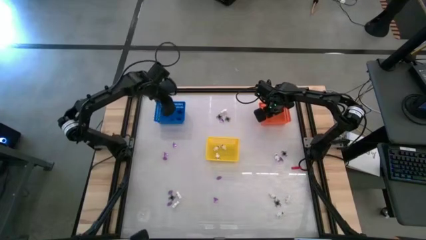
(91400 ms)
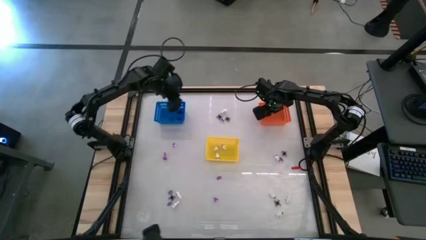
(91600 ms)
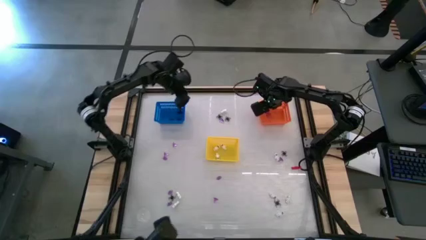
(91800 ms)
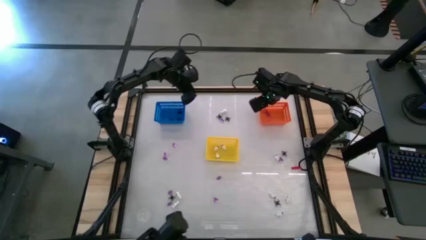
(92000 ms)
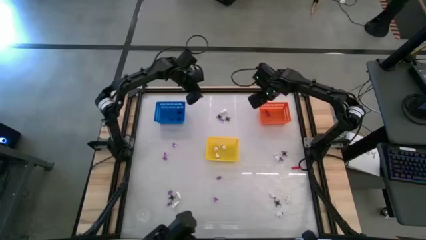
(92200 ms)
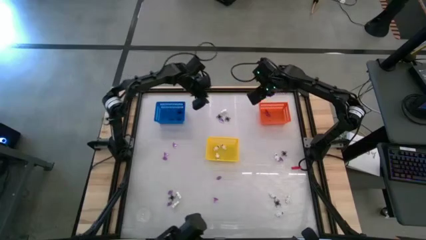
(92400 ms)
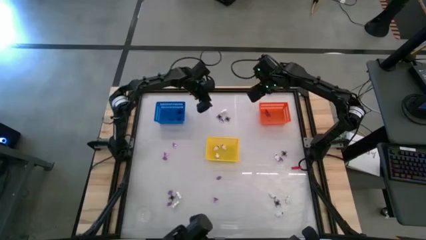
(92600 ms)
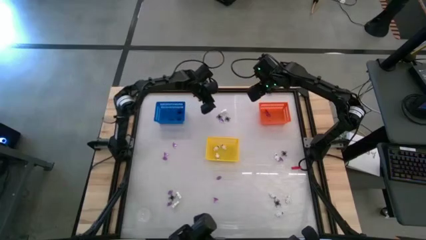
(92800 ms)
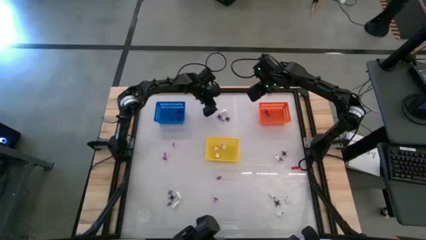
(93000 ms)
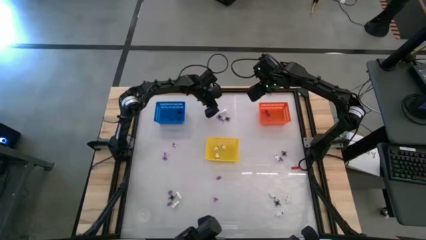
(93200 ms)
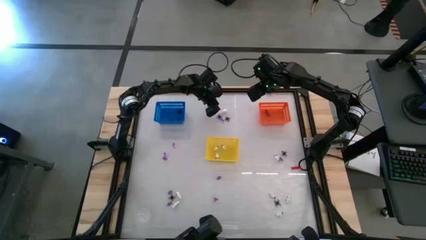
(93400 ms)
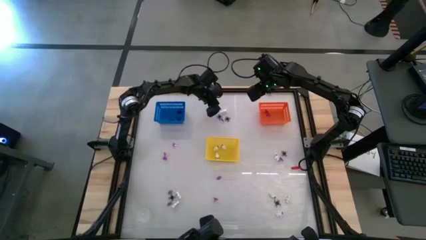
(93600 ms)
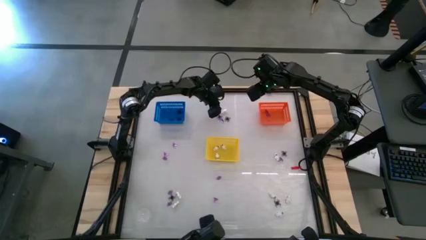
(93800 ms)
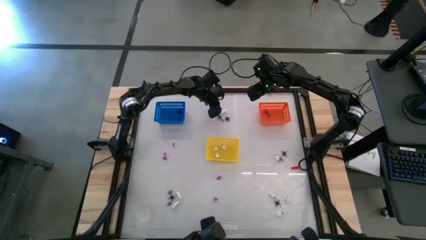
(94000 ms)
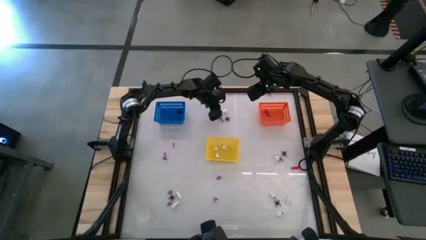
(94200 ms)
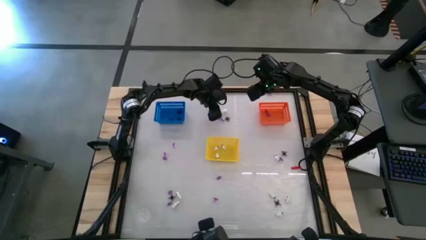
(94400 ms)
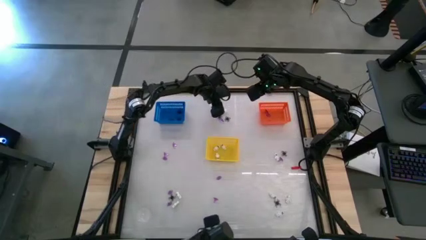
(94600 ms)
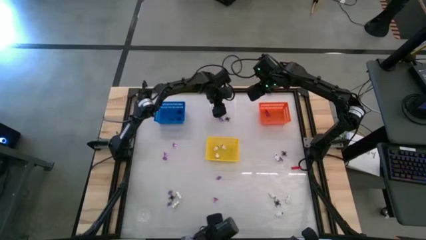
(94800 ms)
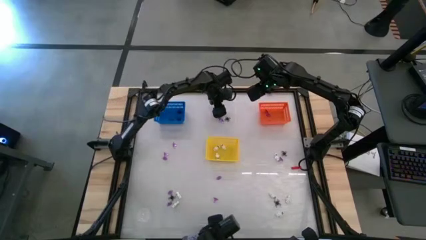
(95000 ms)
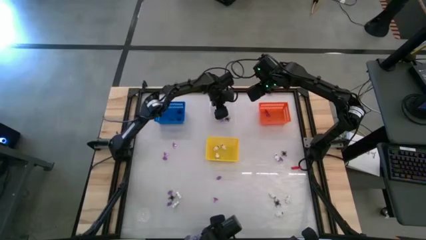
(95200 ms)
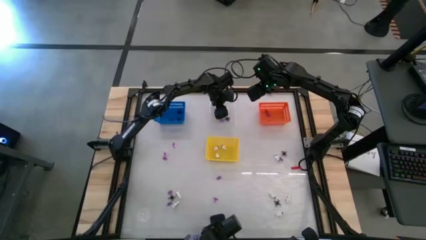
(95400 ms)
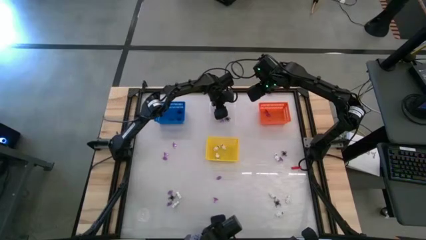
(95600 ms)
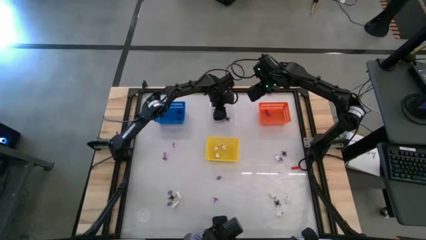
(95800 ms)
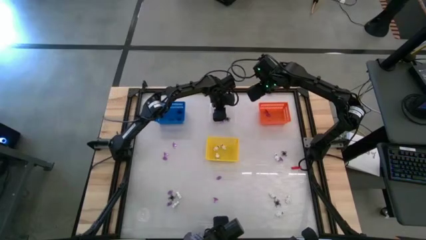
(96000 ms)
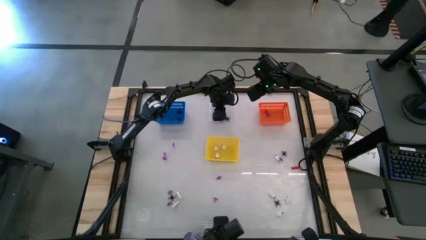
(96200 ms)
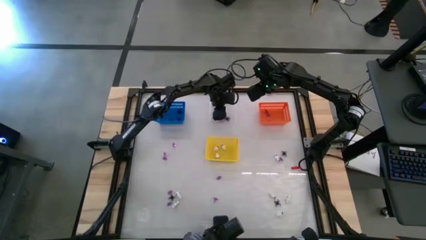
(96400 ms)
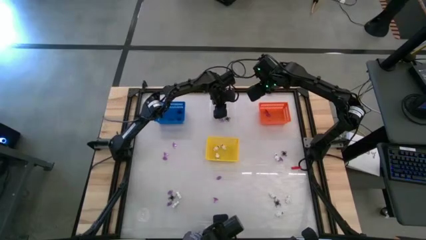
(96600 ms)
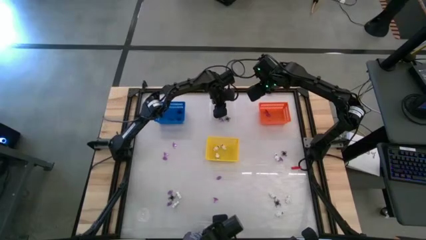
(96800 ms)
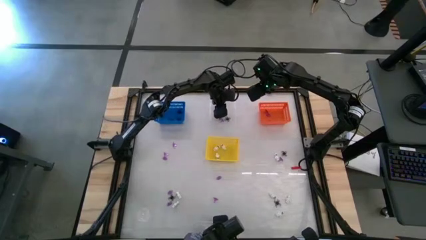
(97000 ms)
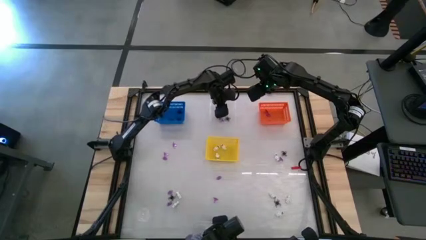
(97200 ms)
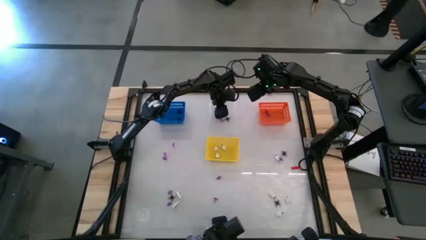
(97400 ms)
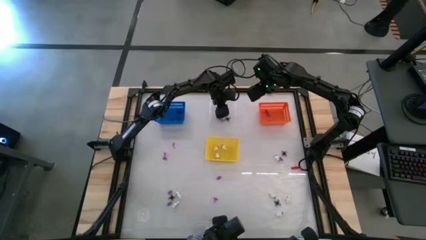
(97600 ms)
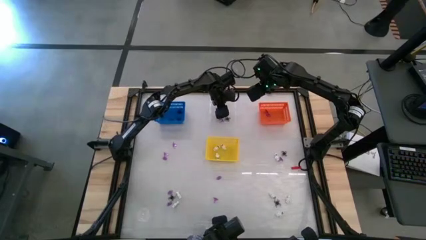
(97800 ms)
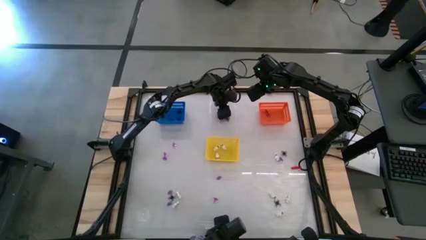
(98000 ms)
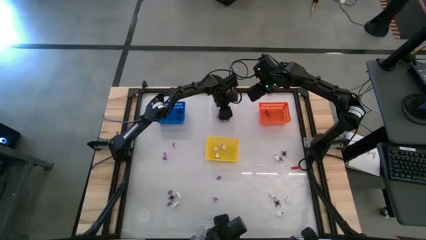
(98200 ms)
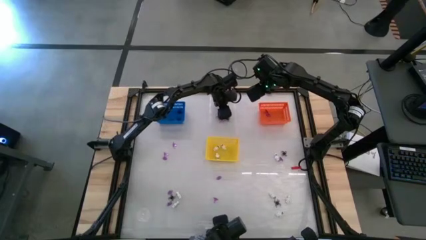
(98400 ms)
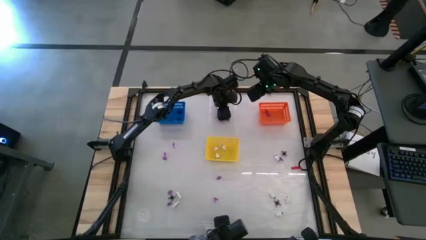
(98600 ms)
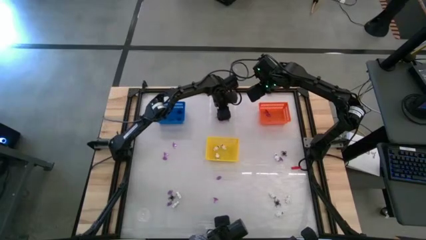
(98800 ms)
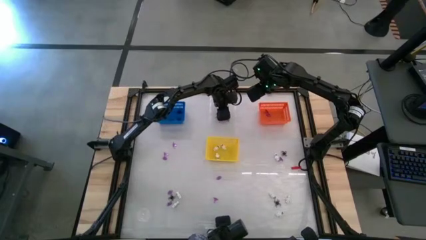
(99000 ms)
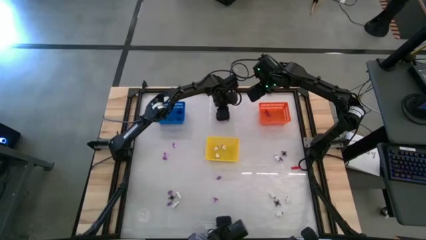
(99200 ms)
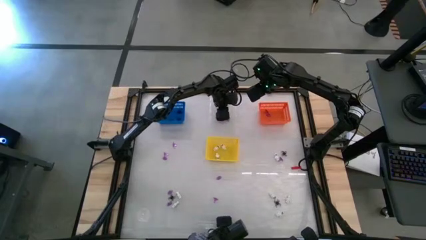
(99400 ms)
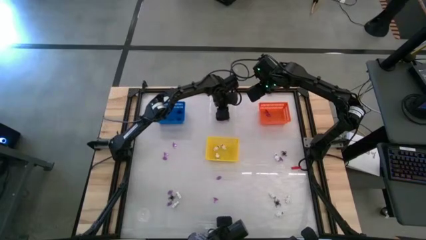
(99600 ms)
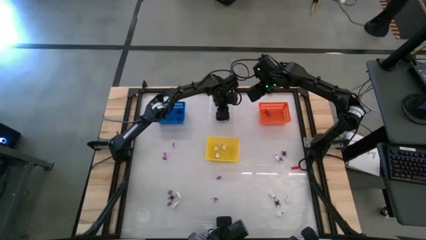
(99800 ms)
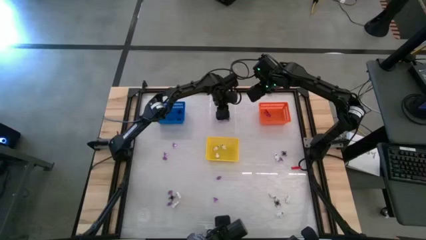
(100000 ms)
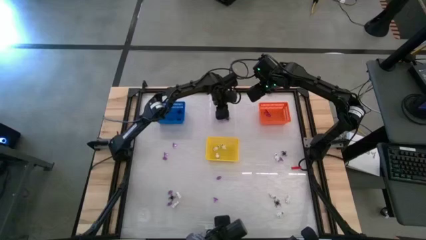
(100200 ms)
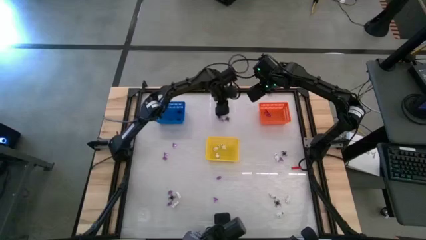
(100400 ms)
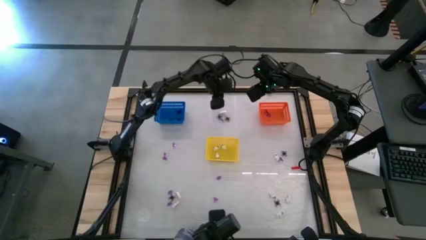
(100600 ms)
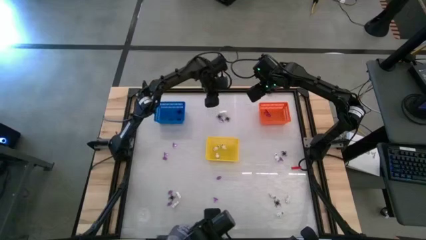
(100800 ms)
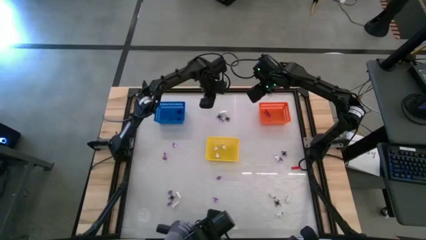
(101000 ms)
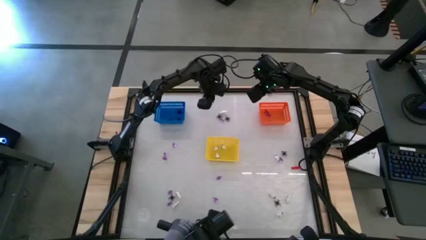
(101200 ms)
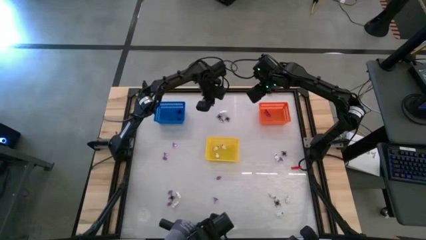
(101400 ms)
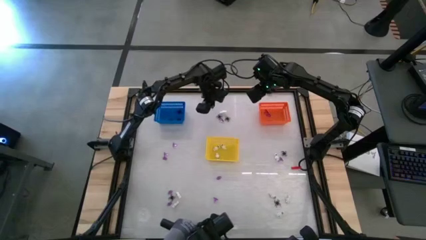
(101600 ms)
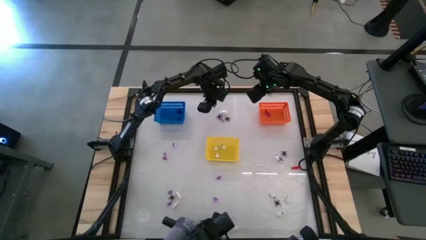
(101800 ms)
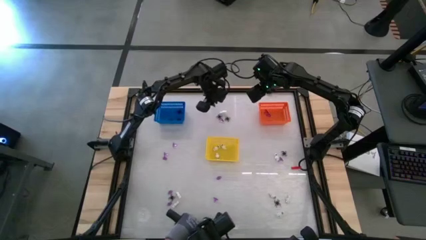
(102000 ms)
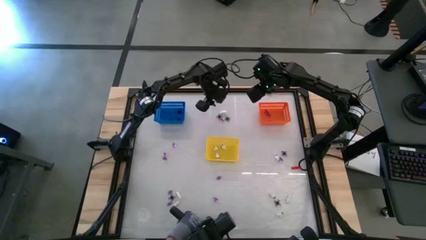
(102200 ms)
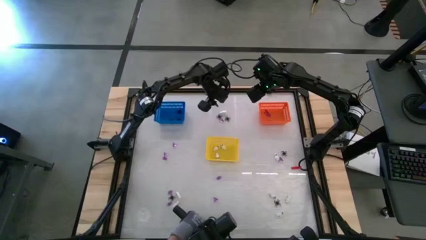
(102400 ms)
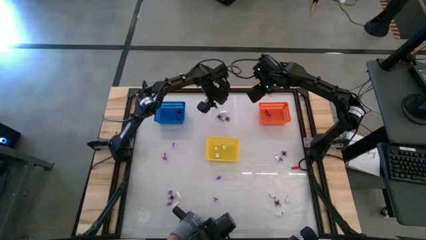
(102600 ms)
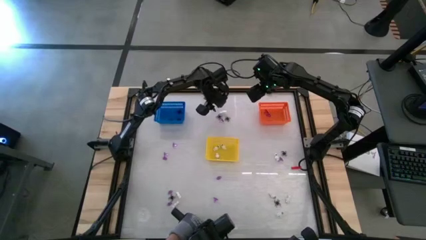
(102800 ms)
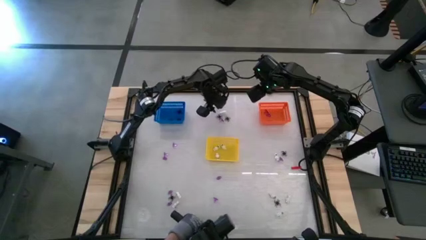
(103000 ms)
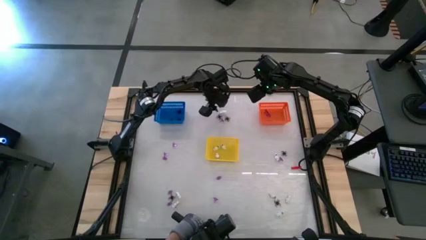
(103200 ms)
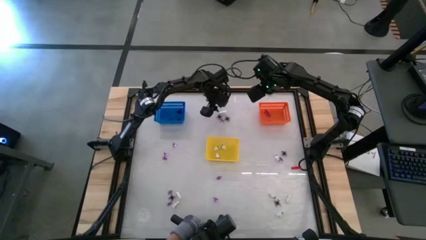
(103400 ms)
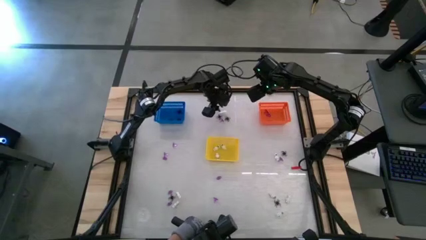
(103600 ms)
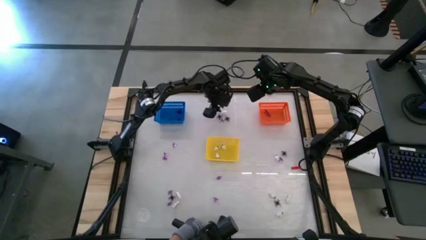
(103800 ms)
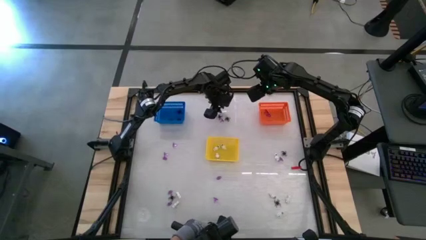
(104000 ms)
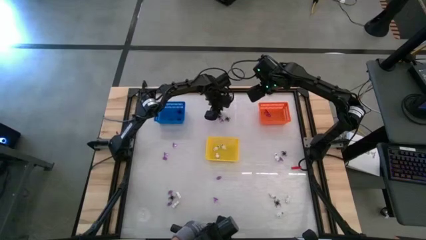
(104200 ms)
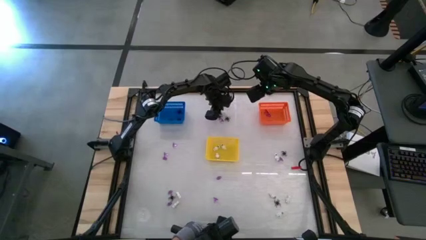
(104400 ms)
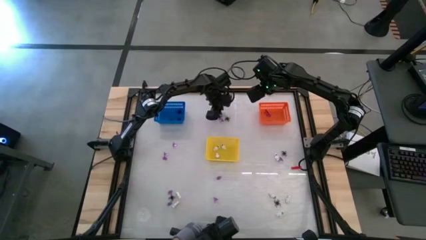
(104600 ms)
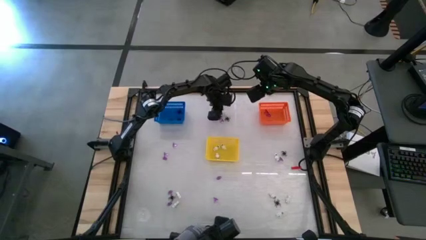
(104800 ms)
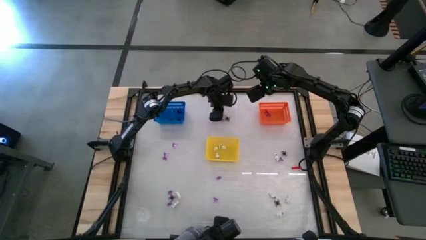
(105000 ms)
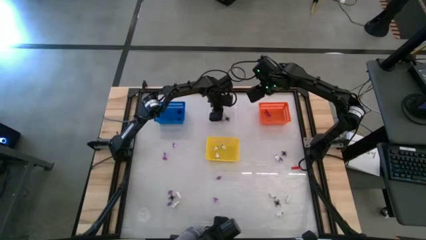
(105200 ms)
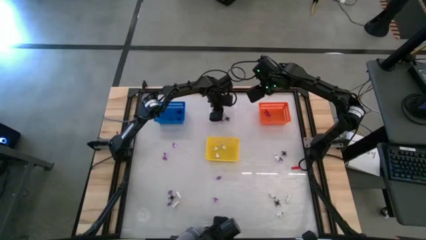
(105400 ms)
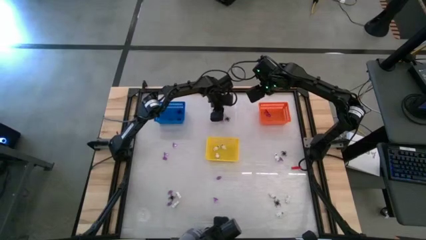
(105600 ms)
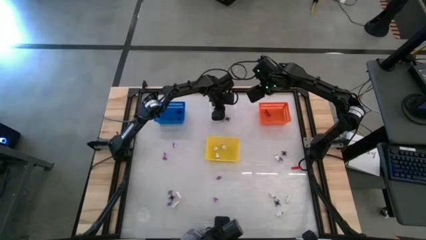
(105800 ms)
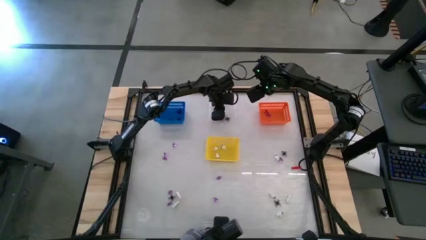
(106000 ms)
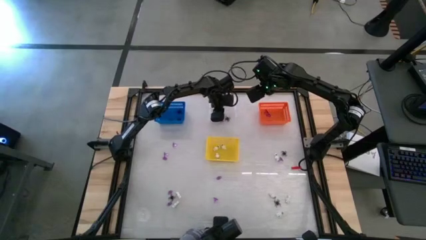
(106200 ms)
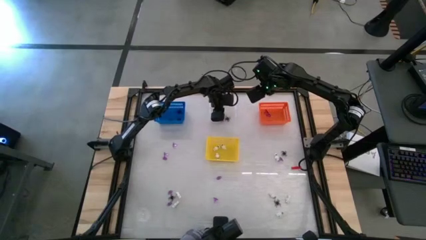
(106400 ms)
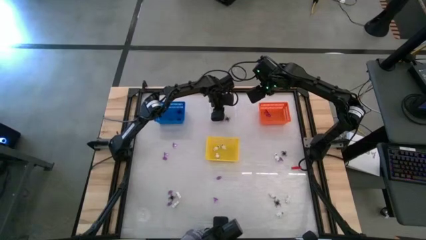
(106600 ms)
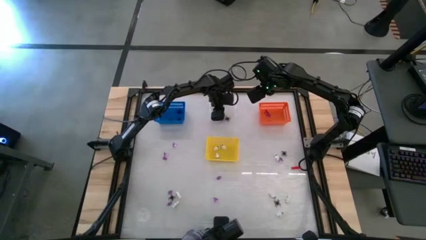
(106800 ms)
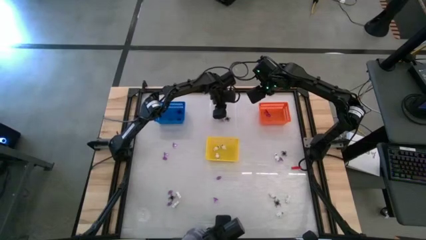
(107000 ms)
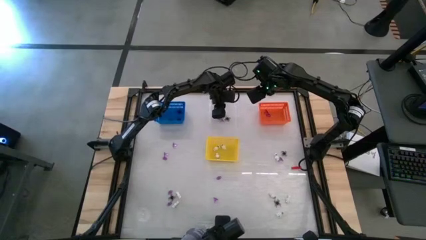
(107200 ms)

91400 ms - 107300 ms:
Task: Sort Halloween decoration
Put the white skeleton toy into the yellow bin
